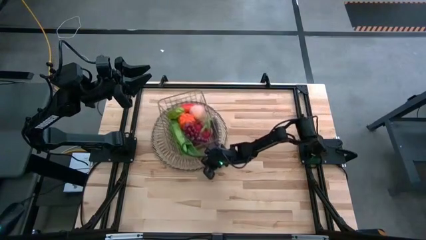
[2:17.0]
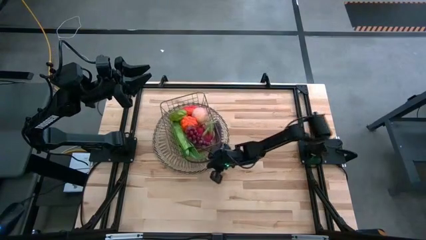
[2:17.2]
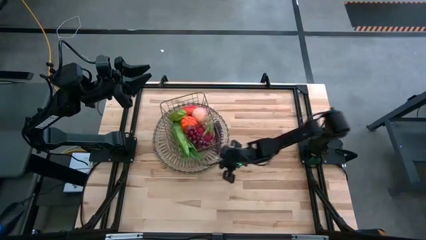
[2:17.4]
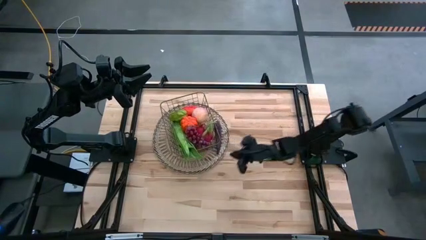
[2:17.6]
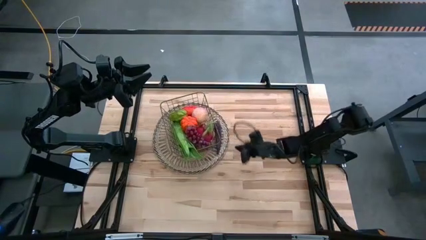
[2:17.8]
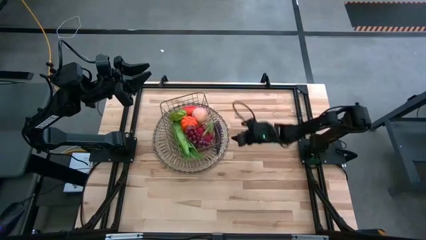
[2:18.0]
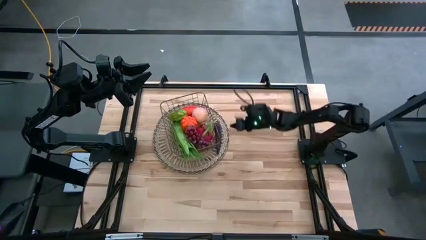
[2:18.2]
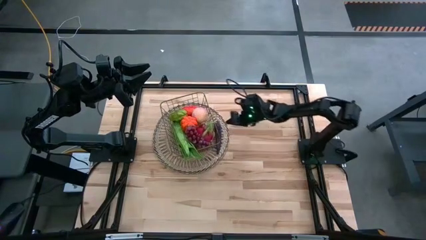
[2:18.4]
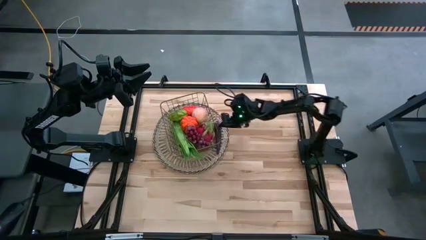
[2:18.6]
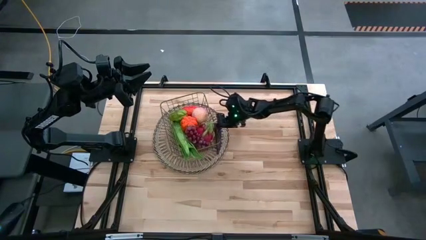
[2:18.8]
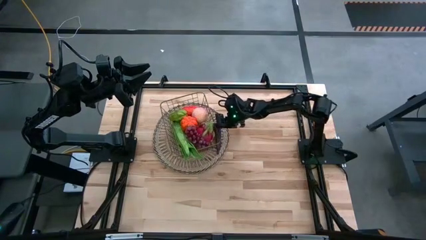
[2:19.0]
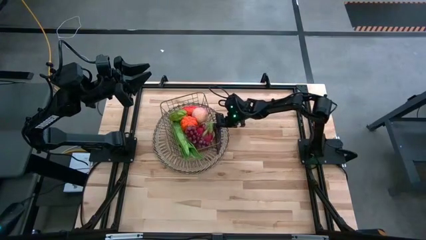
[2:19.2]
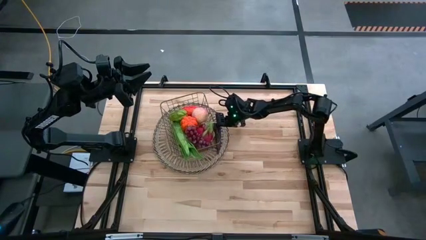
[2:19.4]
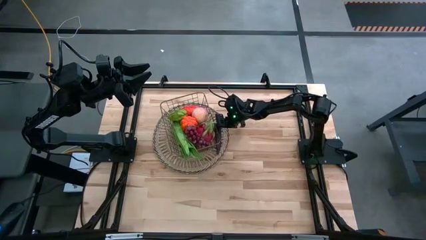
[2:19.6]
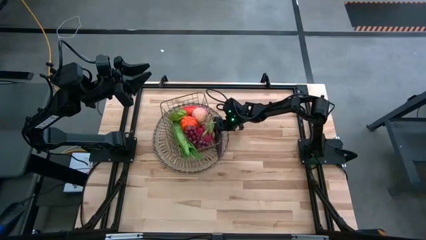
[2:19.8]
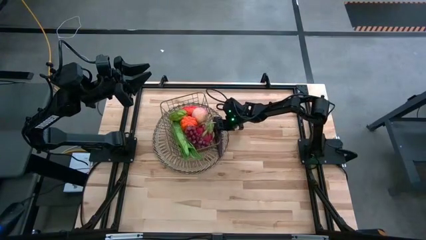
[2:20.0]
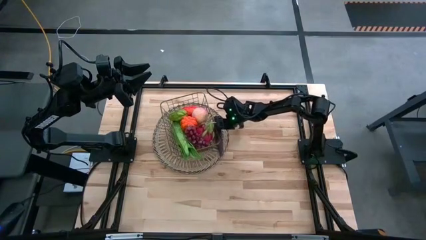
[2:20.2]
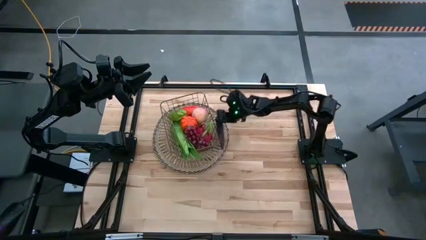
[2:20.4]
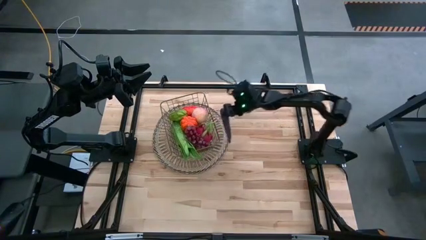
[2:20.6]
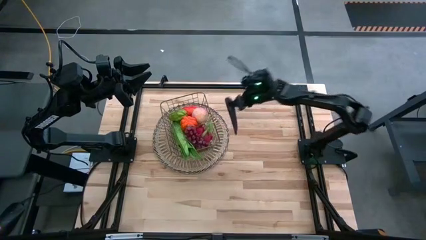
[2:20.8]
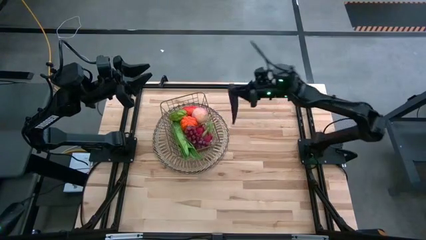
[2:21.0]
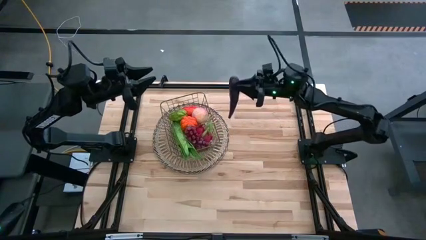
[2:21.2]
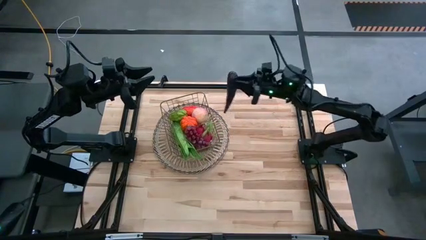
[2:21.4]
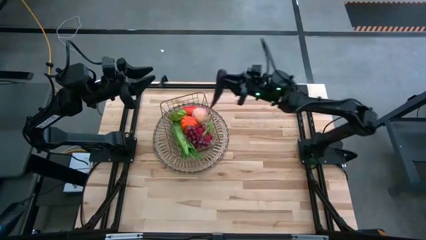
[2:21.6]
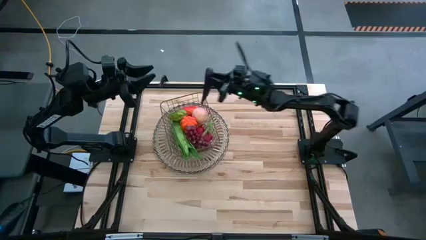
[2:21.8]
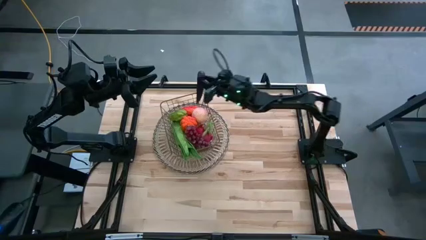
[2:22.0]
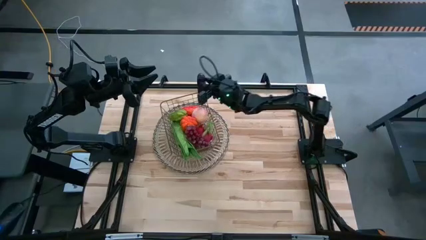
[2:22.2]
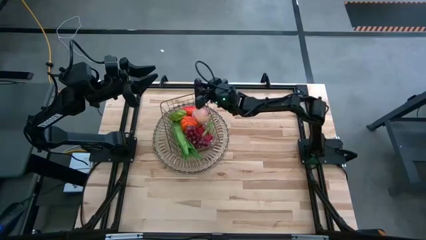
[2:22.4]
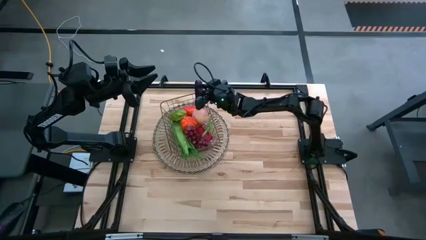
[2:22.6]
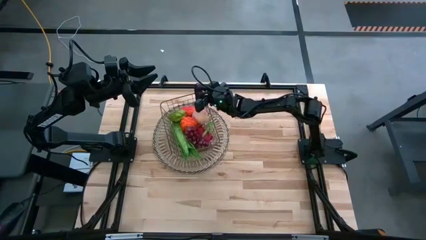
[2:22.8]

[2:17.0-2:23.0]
Task: Build produce basket
Put the eggplant into the wire basket

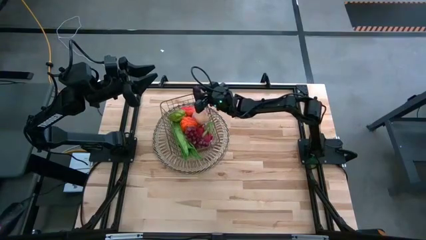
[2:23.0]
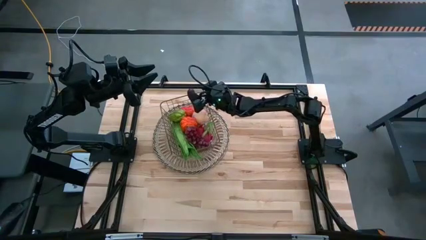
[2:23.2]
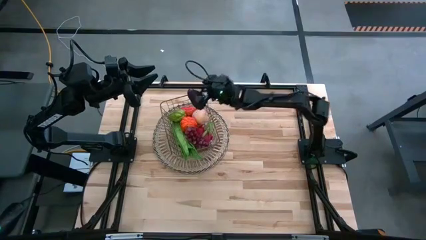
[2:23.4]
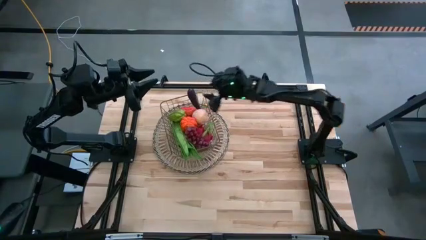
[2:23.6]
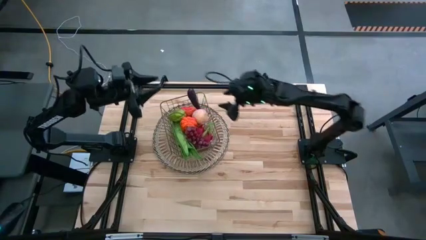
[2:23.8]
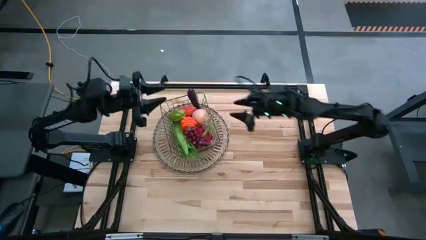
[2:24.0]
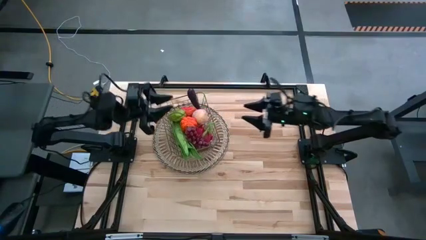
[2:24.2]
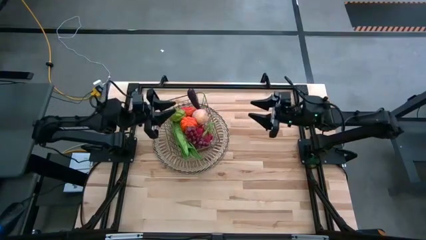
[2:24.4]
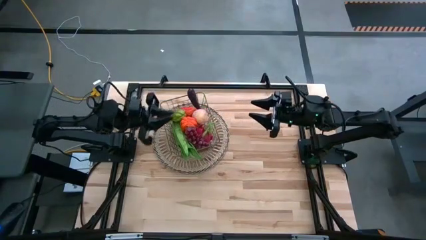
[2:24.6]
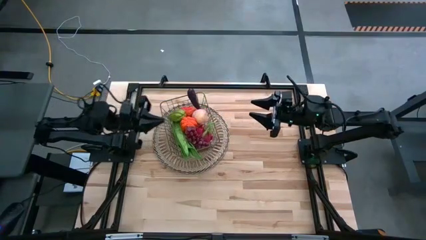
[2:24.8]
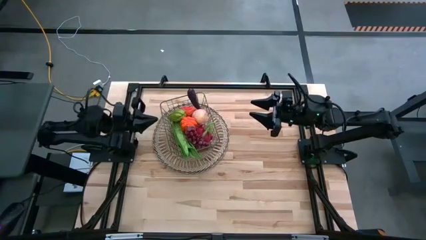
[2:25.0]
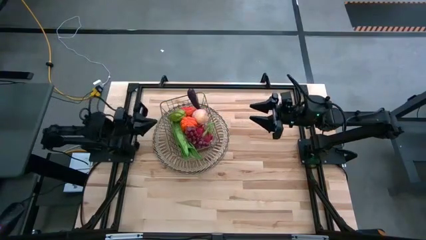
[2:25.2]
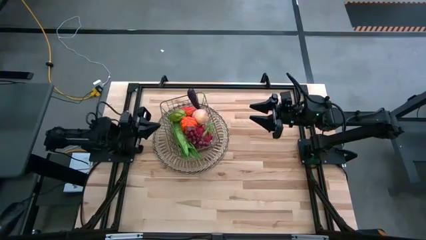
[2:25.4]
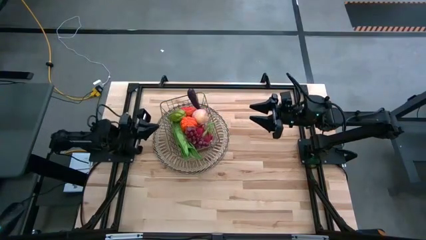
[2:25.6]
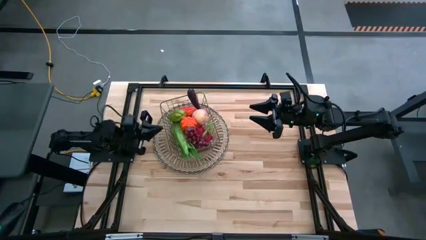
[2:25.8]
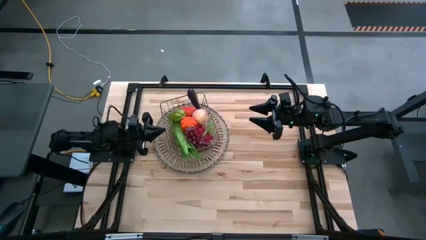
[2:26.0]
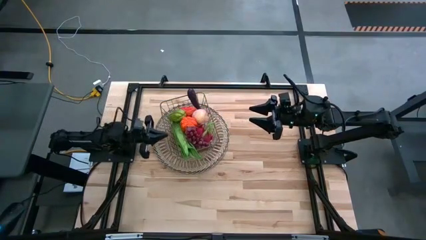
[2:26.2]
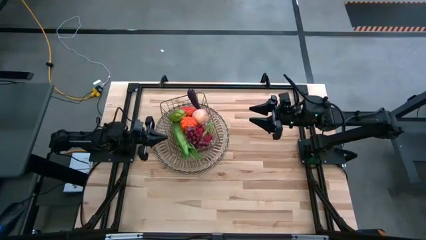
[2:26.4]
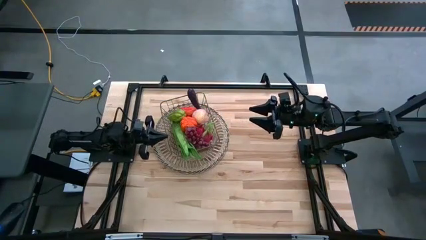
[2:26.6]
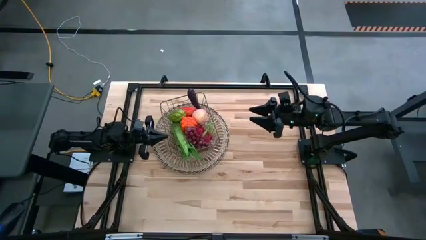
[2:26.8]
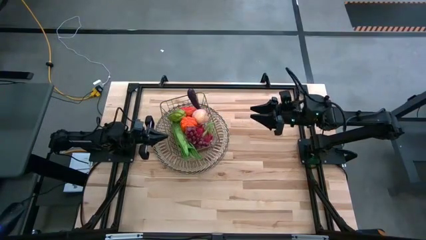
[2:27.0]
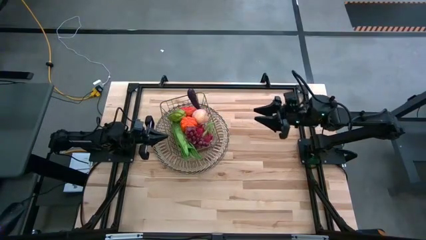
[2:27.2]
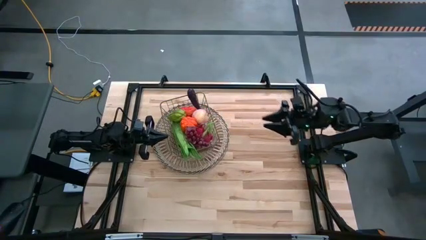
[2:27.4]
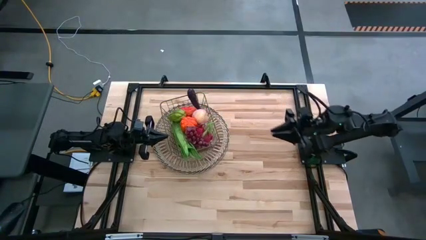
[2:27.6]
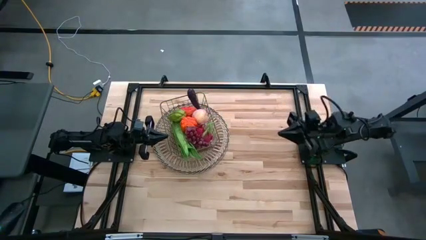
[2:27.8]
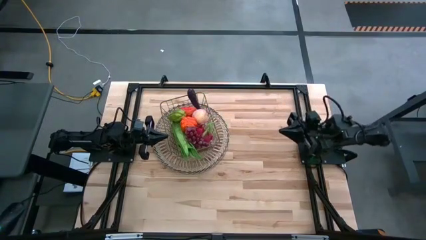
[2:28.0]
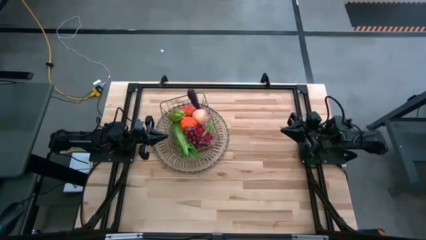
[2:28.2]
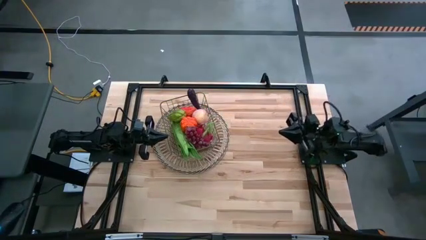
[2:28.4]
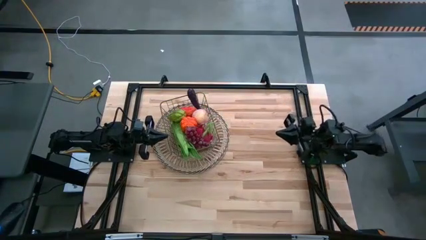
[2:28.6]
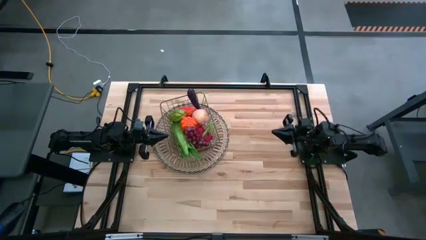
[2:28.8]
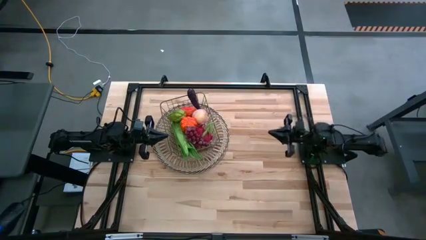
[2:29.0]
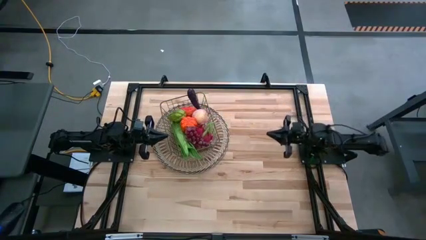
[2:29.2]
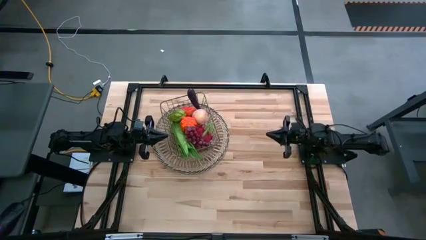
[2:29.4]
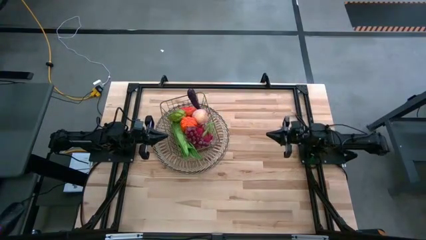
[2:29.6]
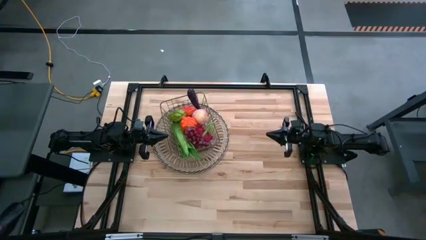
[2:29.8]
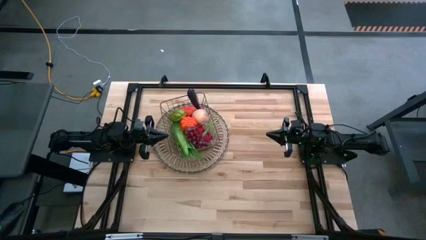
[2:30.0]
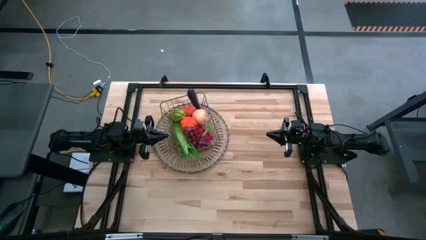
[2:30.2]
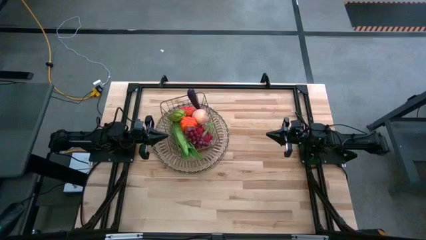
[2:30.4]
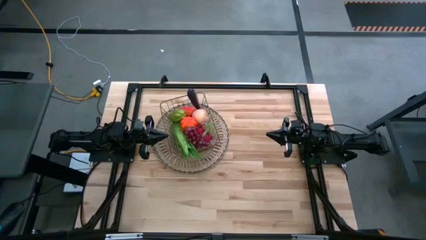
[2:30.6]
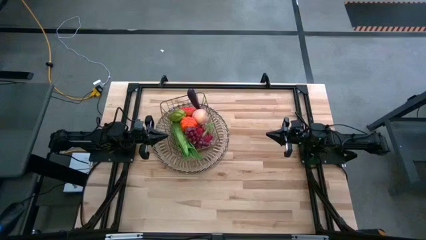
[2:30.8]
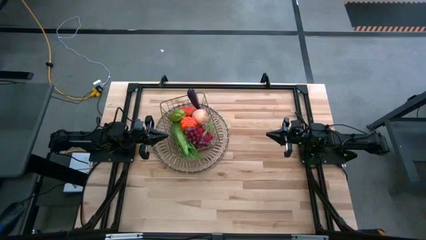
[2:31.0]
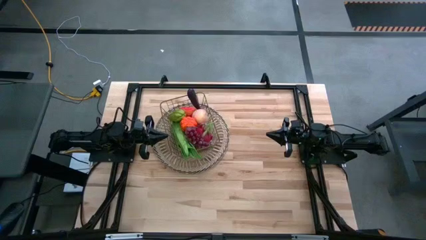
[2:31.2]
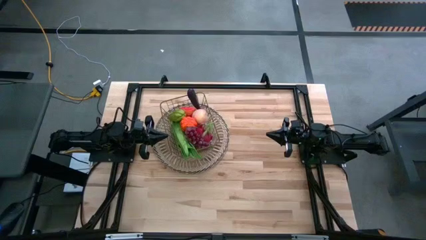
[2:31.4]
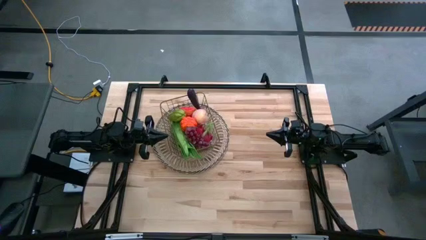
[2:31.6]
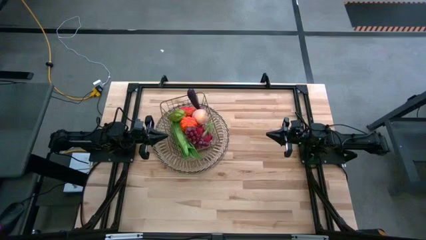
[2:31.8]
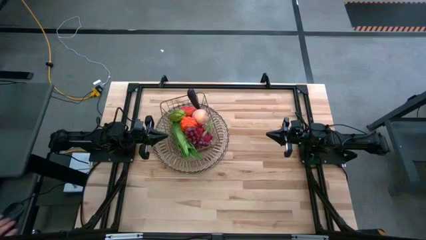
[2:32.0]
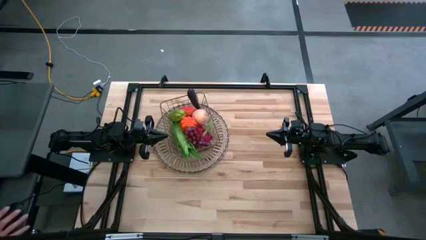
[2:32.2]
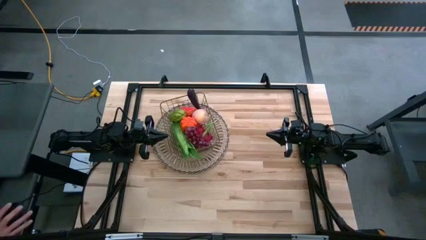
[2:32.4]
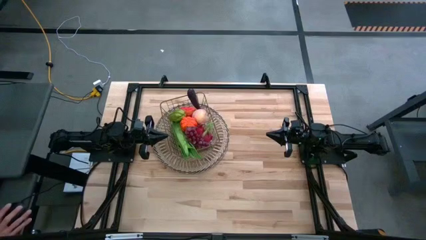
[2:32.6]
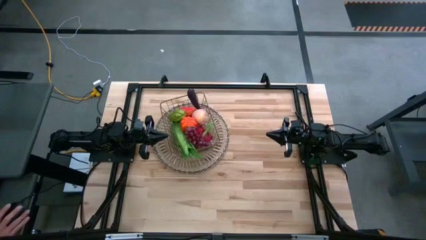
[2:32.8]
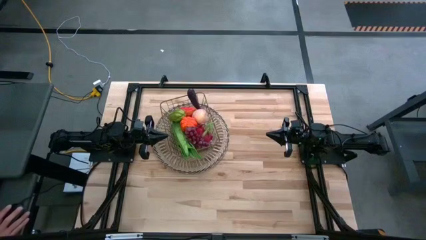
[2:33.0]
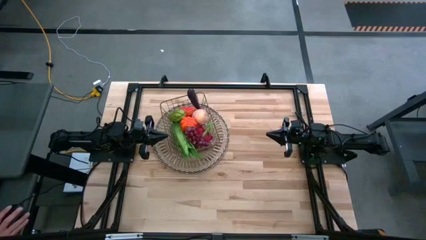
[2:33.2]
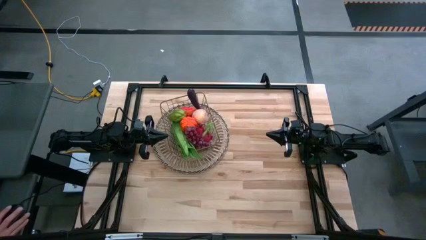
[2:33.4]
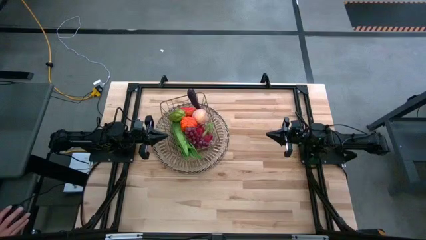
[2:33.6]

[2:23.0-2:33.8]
Return to Home Position

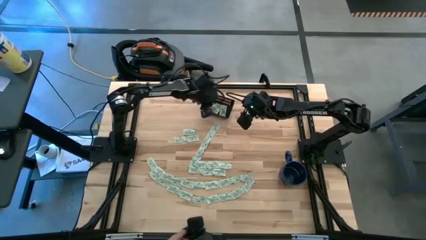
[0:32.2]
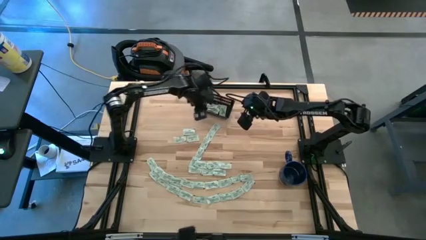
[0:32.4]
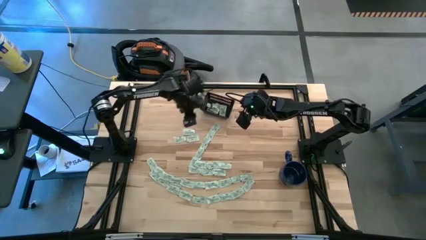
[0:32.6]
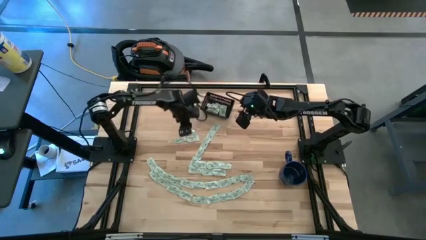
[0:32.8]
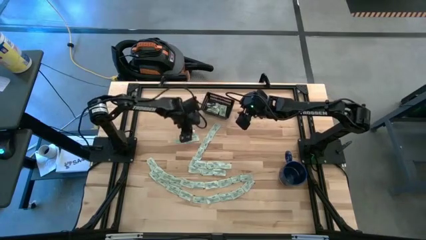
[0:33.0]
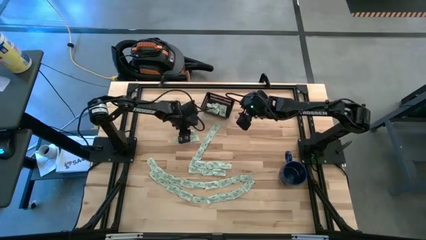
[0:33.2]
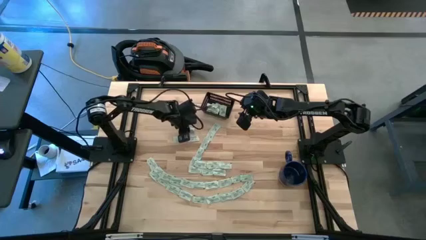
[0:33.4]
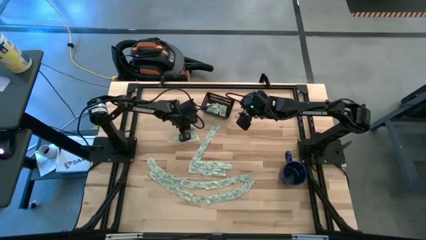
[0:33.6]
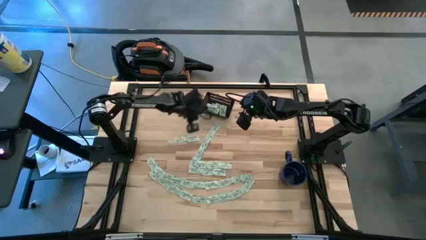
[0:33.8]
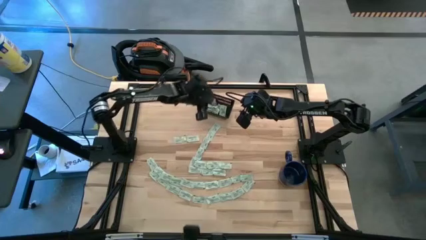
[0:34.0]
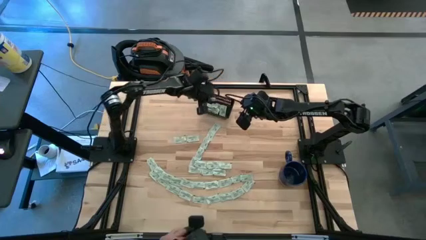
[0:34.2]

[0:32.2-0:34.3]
Task: Pick and place Stevia / Truvia into bins
Put the stevia packet into the black bin
